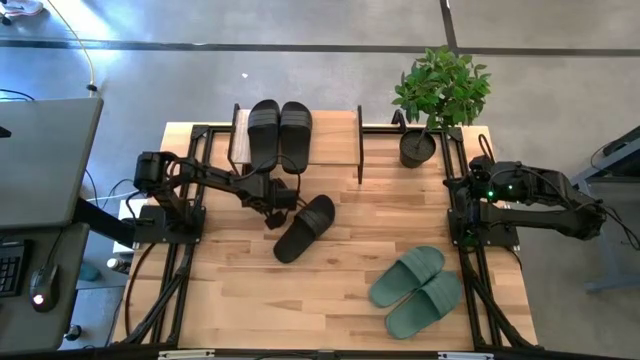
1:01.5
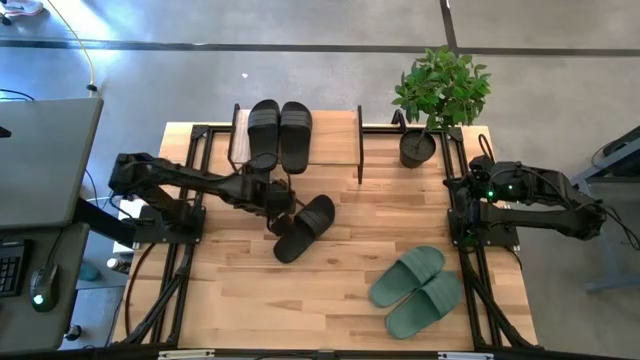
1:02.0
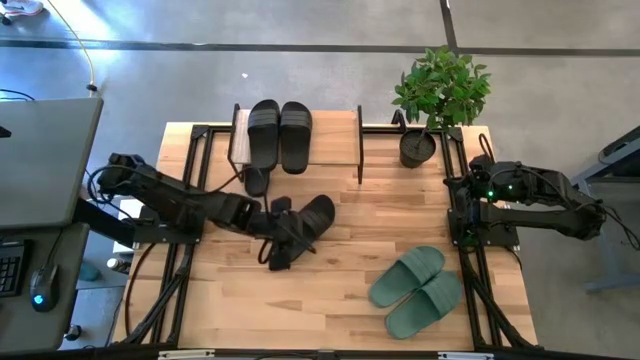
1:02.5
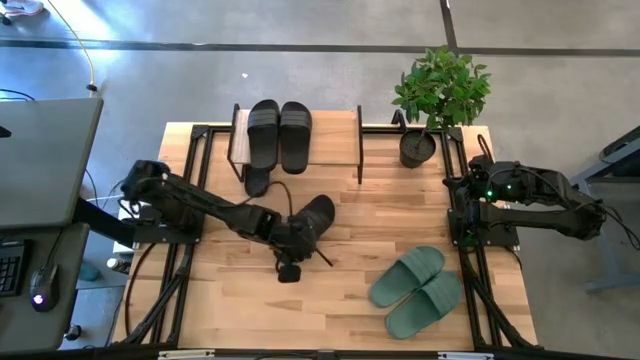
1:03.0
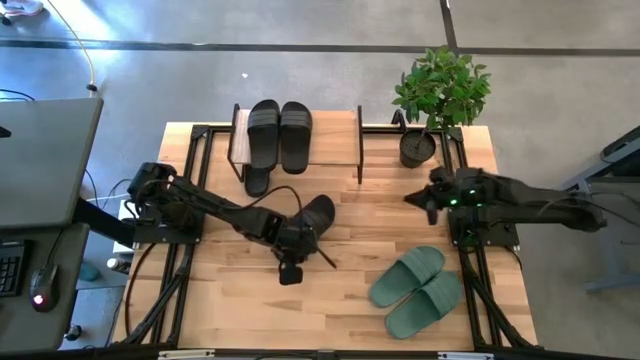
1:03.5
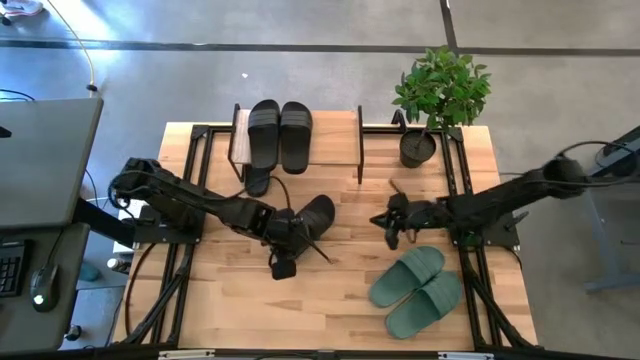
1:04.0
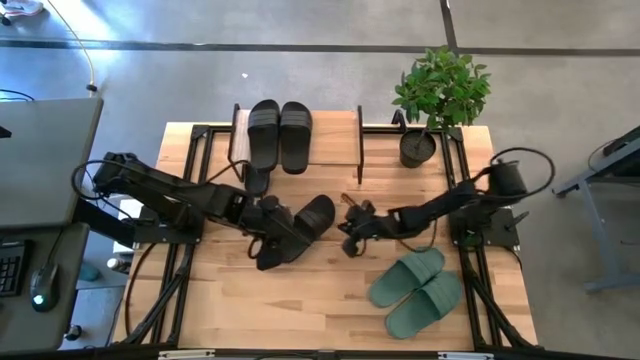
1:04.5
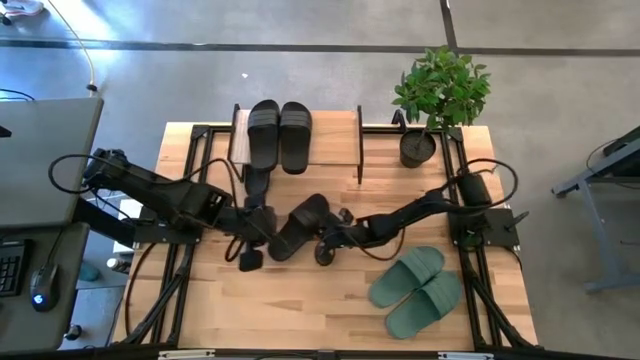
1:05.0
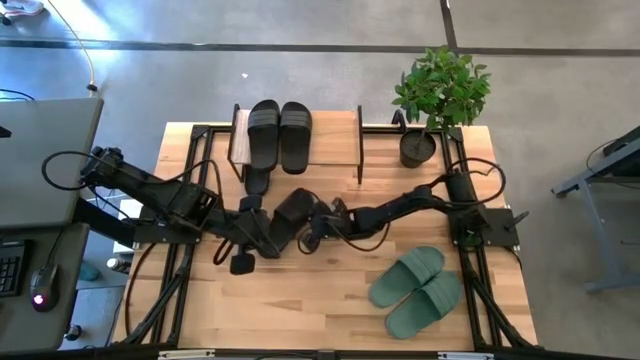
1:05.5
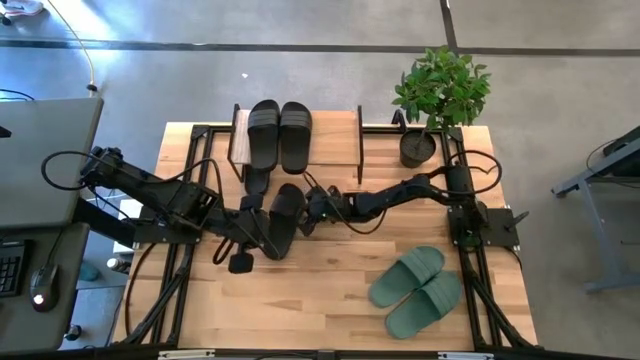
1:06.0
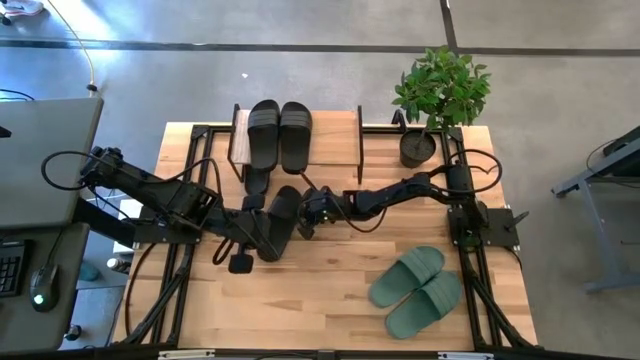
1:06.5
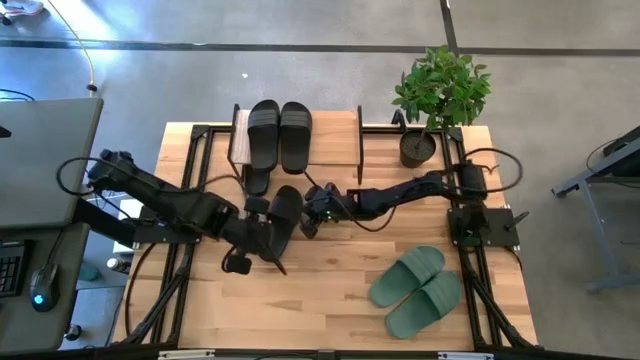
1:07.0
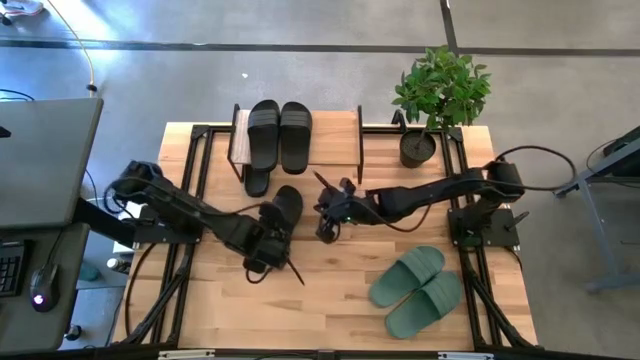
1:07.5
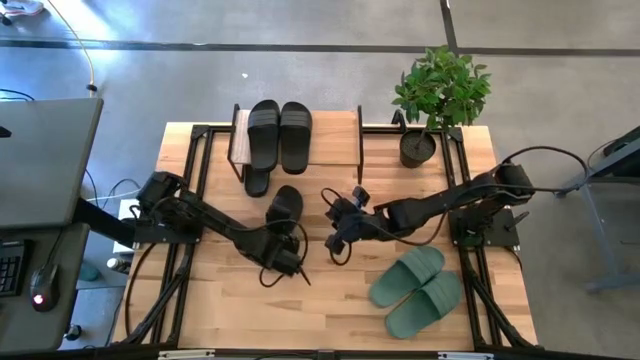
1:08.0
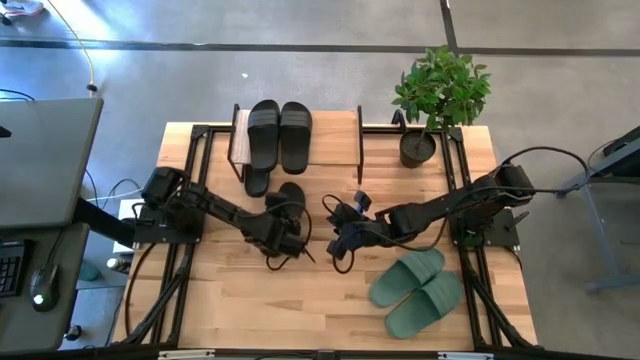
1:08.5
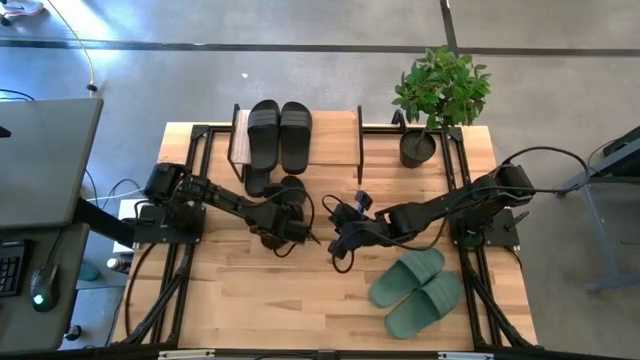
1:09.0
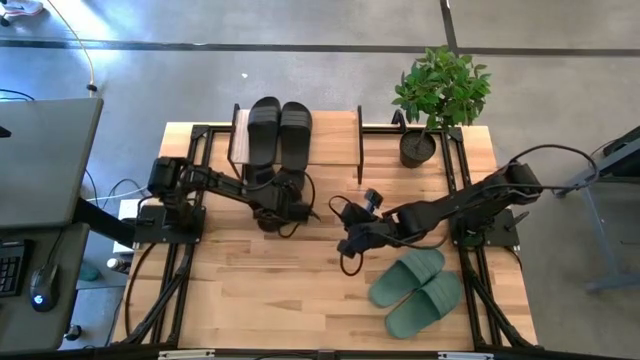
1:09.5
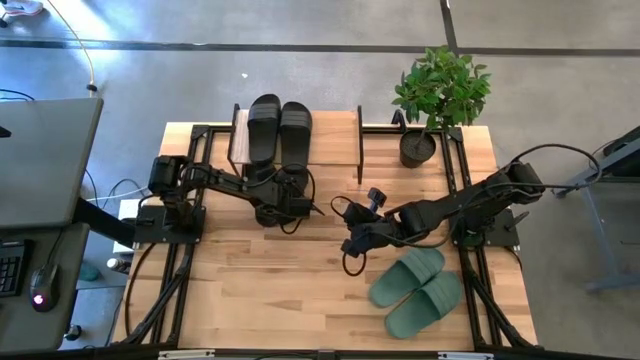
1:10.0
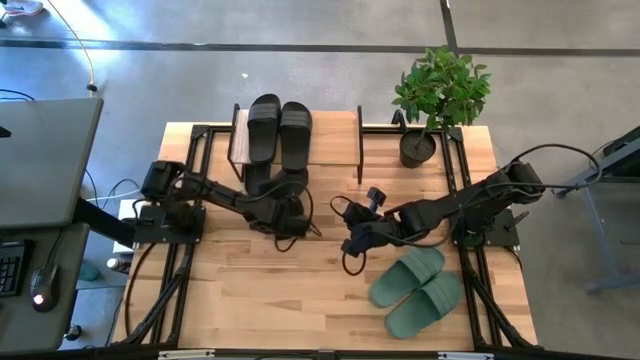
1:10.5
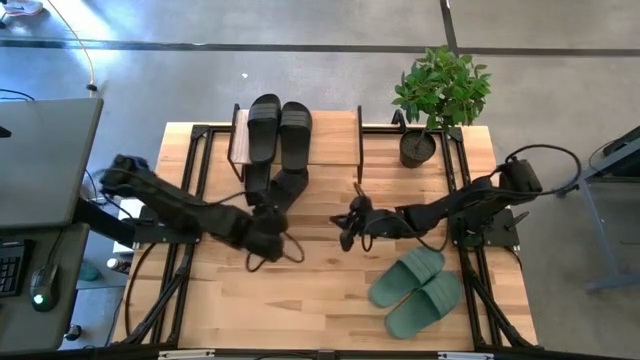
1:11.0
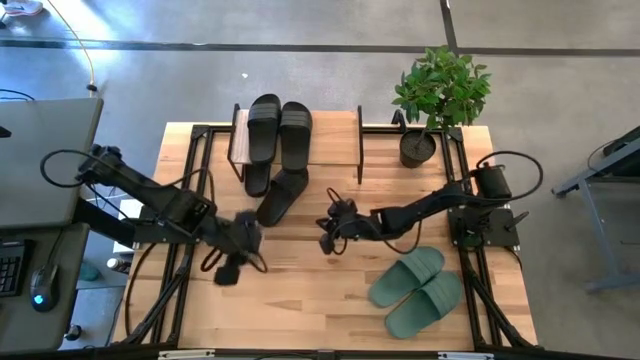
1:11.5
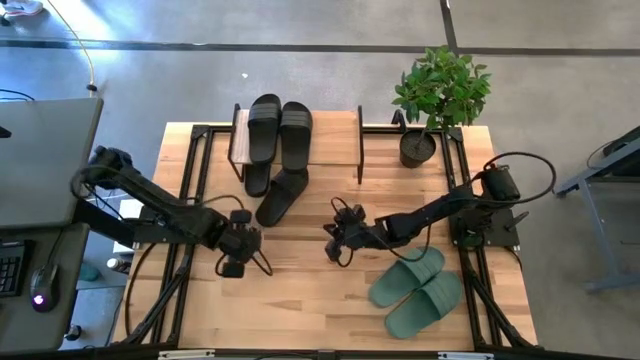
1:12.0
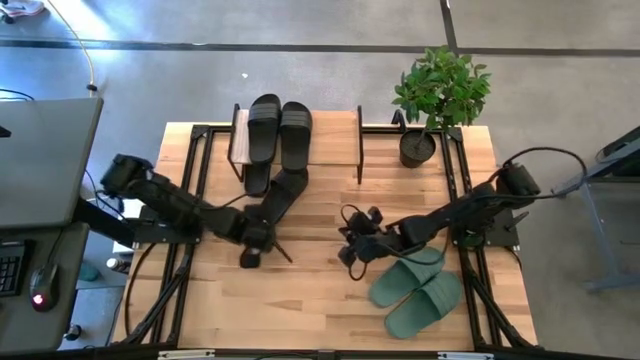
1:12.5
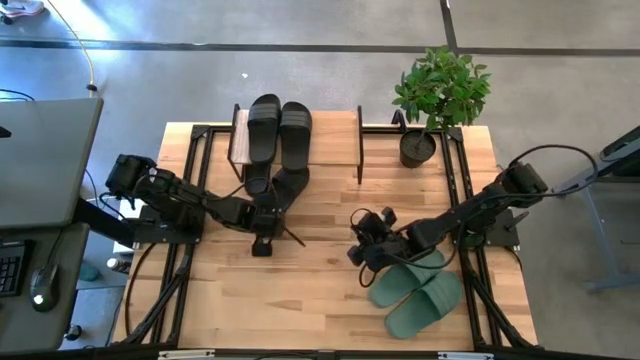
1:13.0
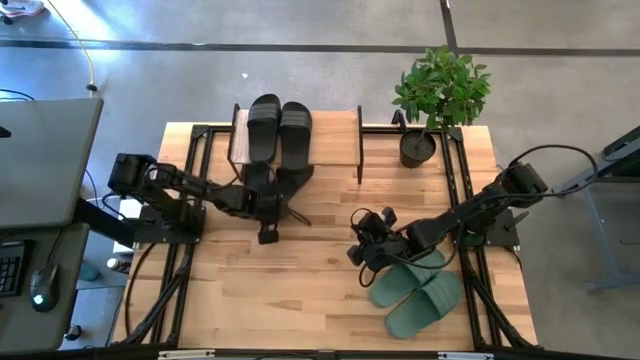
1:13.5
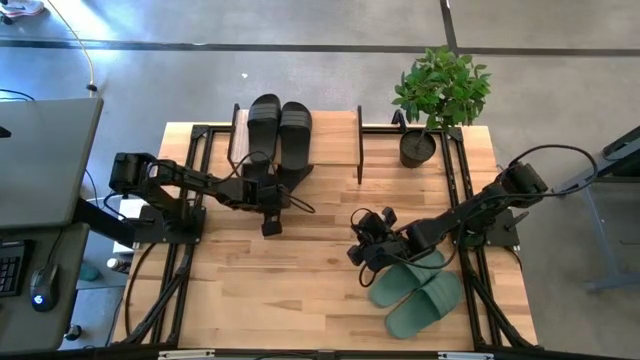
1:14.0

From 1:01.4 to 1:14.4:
Task: Pick and place slides into the shelf
Put the black slide under the shelf

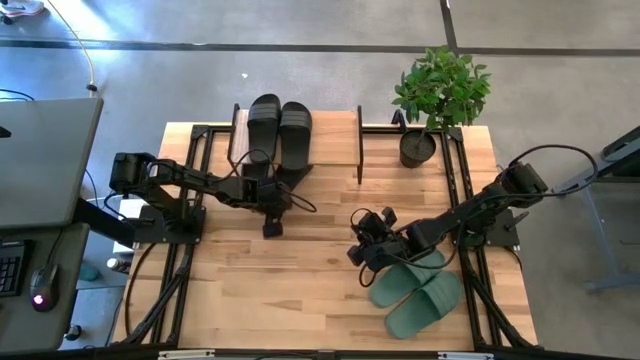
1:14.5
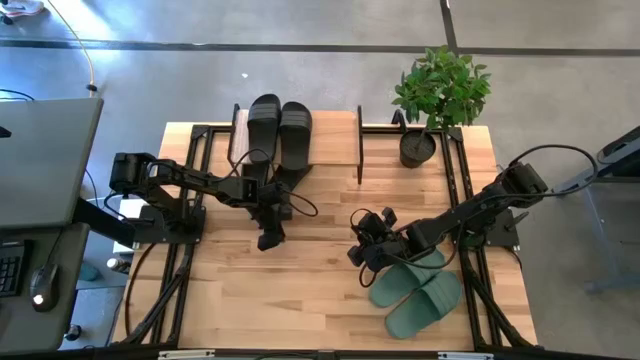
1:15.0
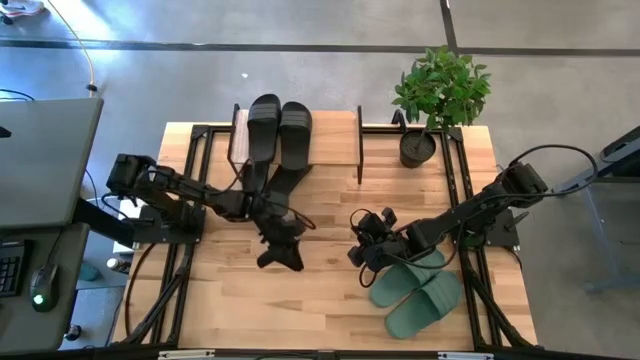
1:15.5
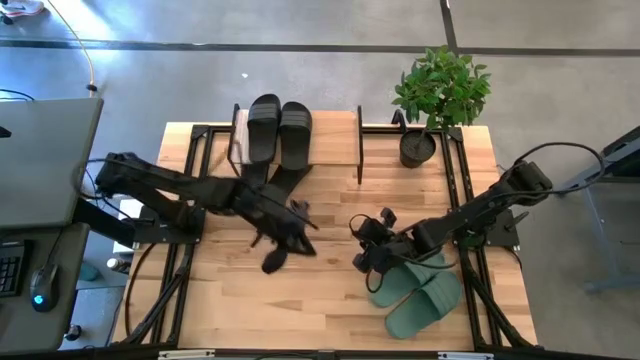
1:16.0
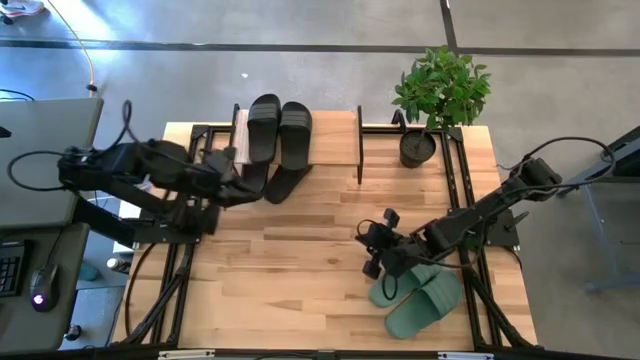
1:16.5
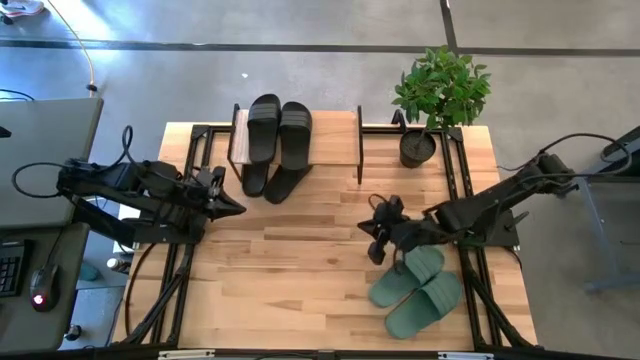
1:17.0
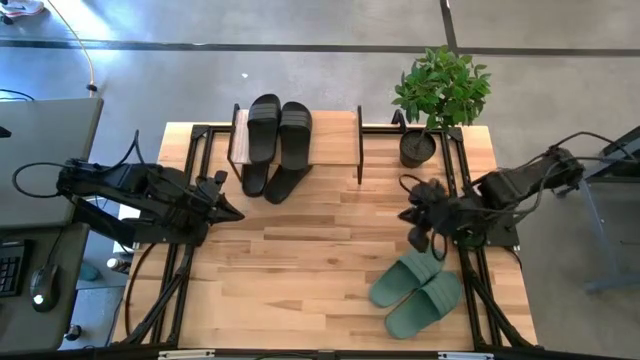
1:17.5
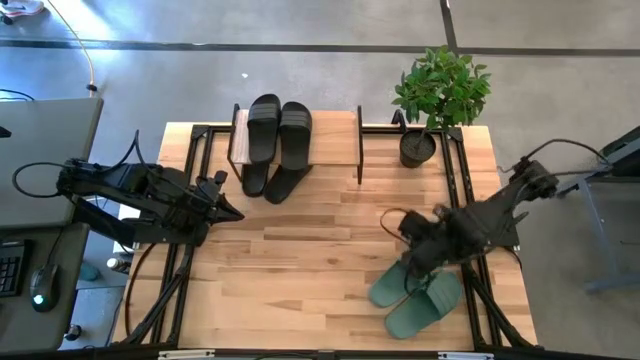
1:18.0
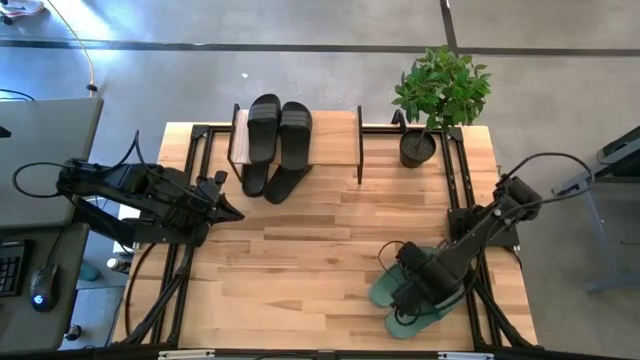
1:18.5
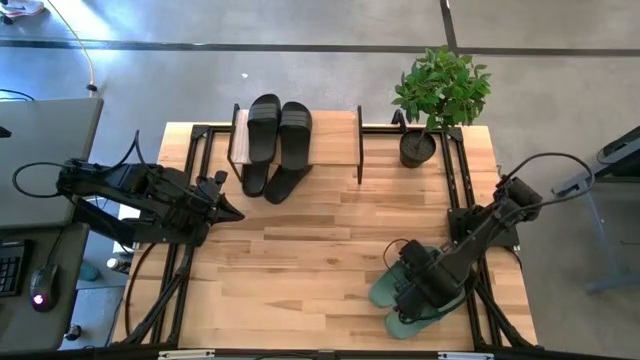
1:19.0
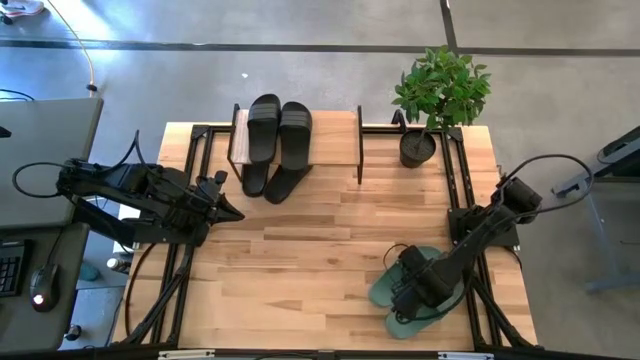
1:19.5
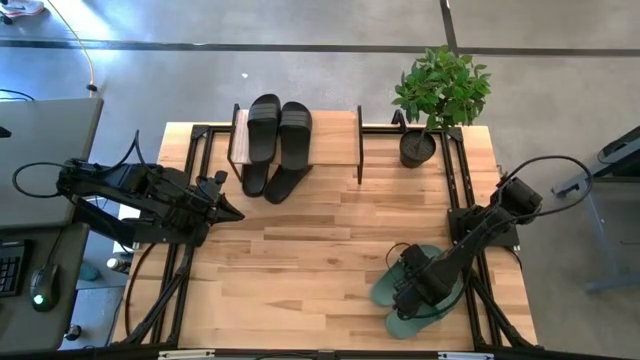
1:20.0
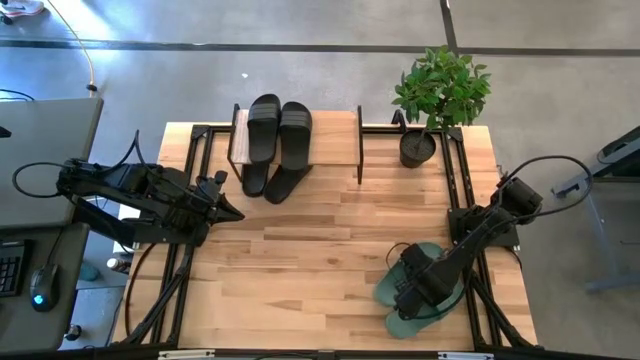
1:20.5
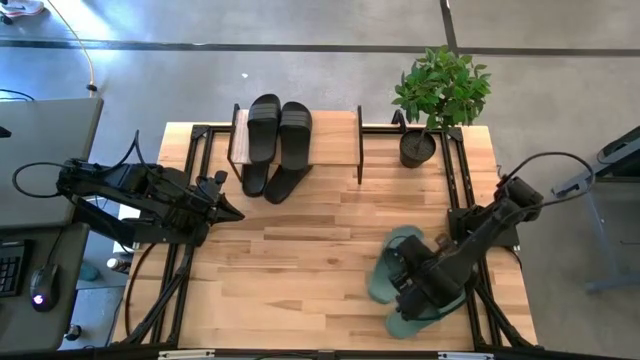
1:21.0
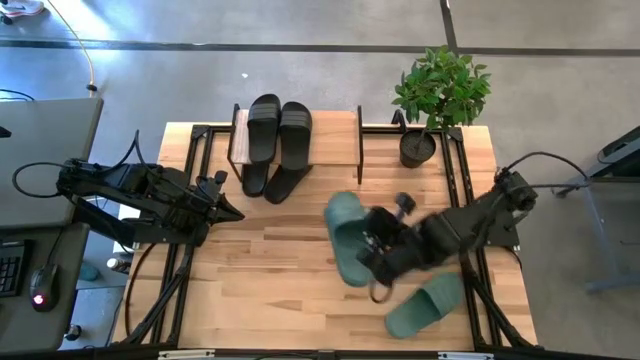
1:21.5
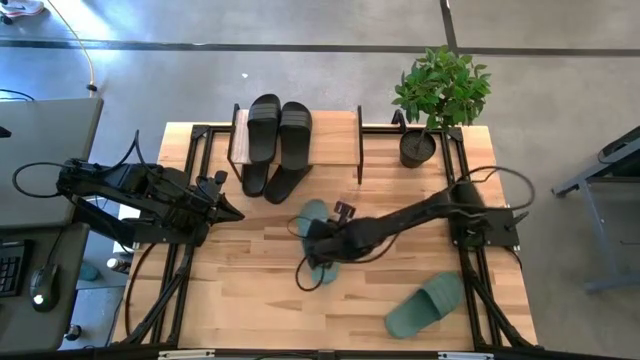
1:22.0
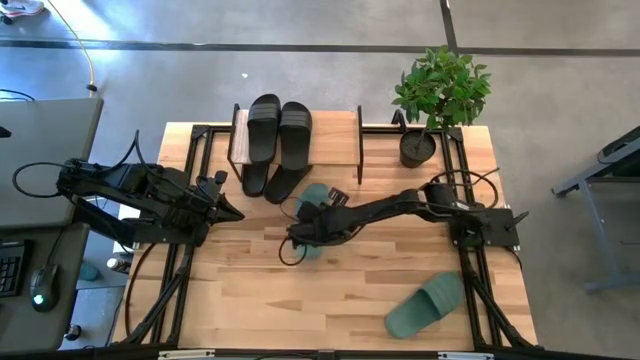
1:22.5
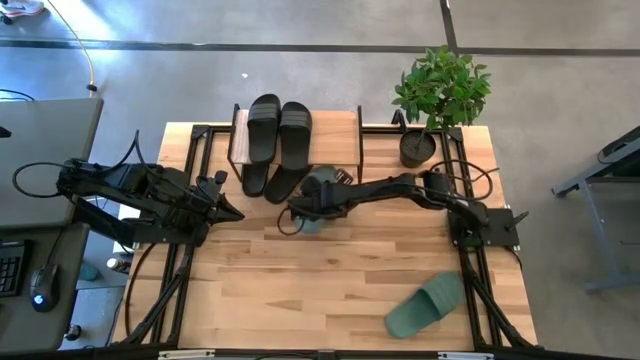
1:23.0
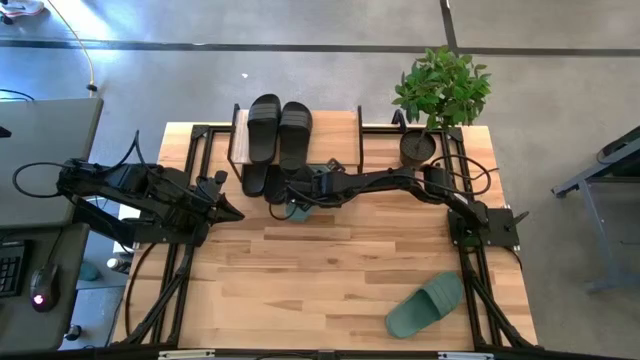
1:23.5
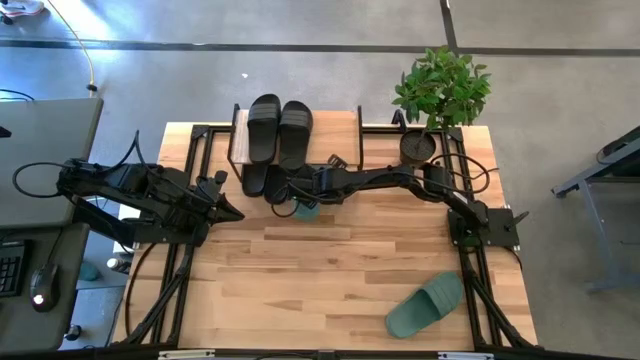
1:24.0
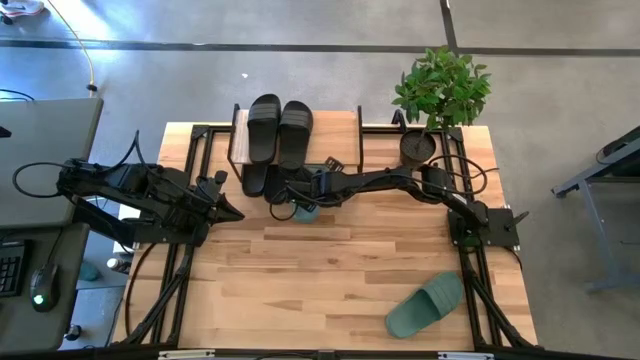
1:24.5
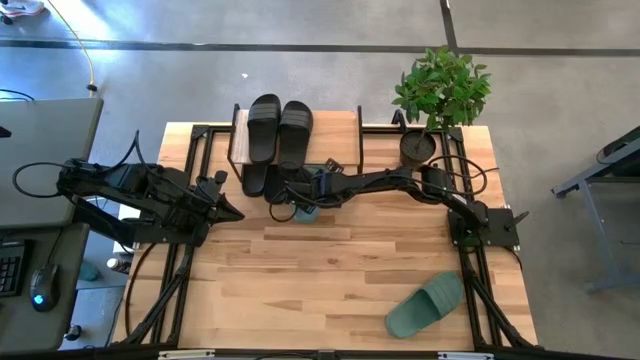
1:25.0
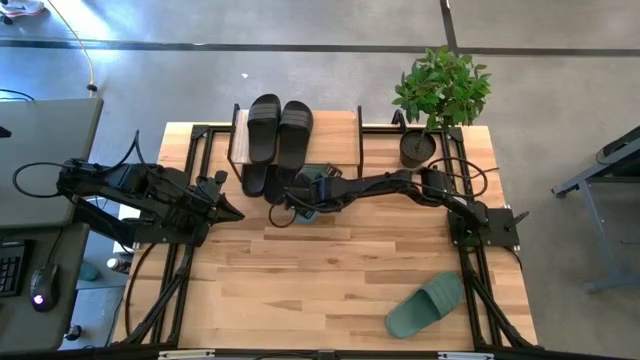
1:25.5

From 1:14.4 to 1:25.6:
Put the top blue slide under the shelf
